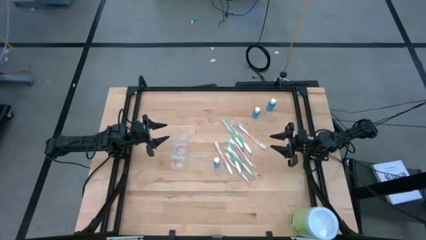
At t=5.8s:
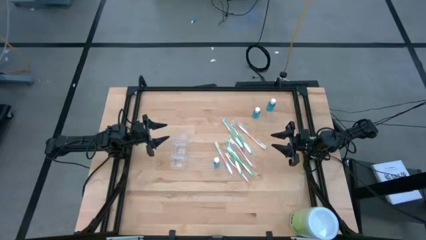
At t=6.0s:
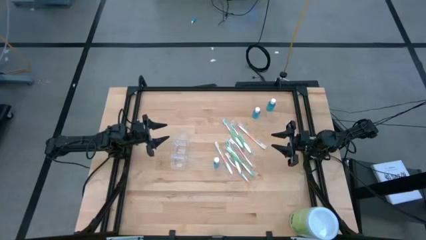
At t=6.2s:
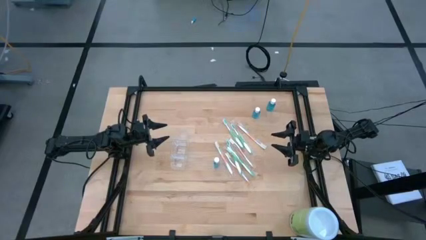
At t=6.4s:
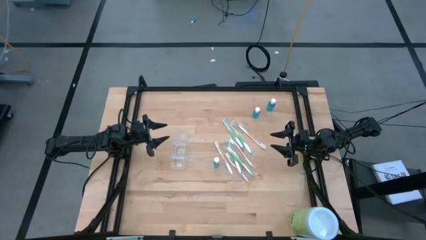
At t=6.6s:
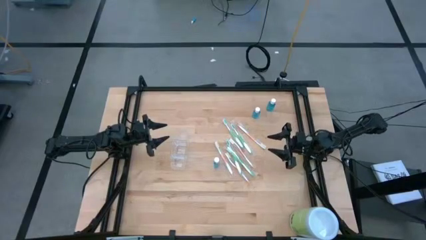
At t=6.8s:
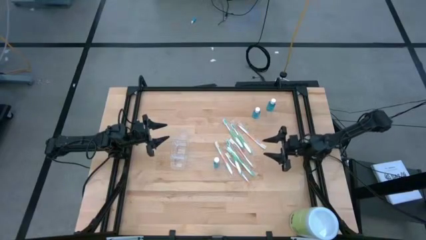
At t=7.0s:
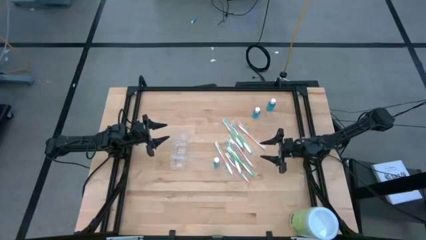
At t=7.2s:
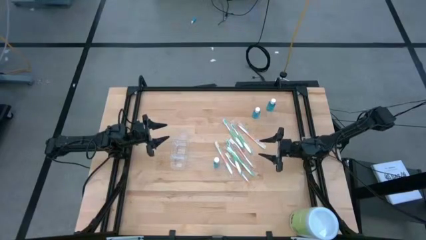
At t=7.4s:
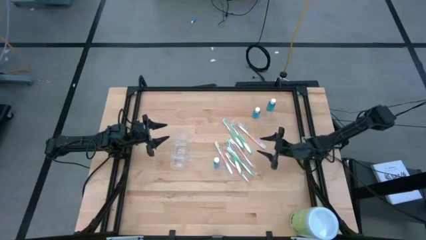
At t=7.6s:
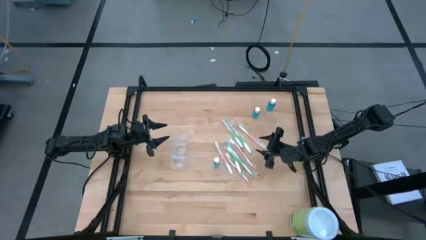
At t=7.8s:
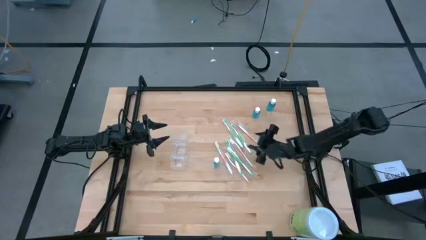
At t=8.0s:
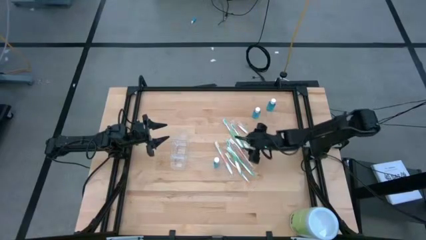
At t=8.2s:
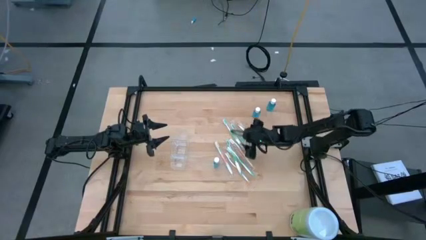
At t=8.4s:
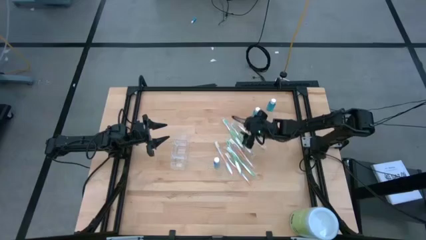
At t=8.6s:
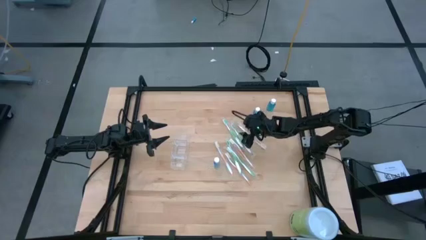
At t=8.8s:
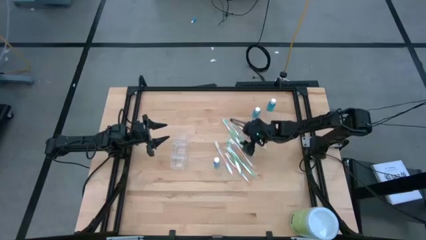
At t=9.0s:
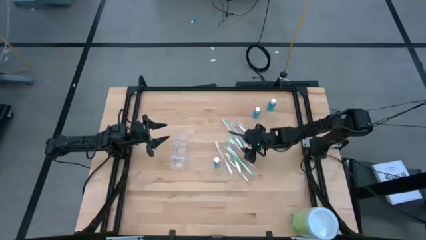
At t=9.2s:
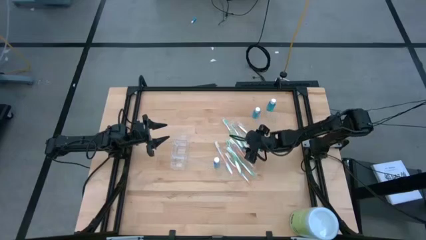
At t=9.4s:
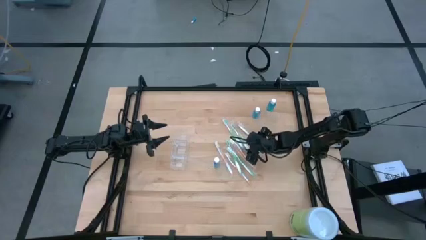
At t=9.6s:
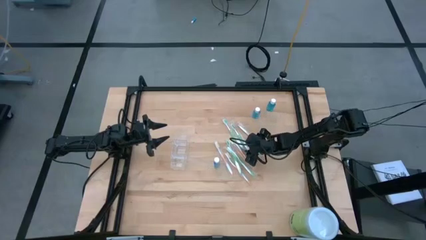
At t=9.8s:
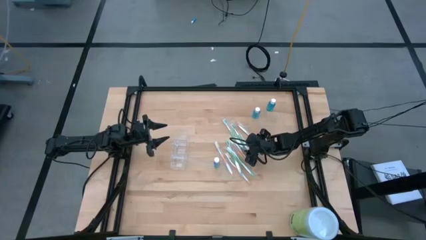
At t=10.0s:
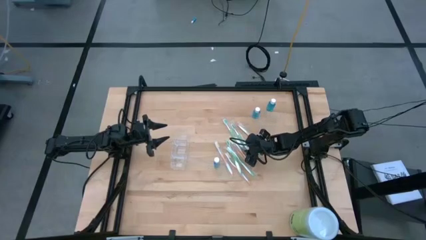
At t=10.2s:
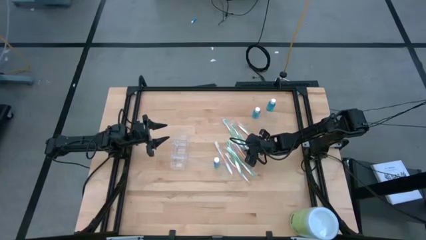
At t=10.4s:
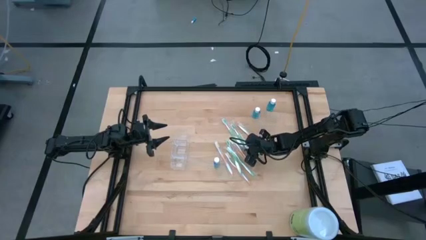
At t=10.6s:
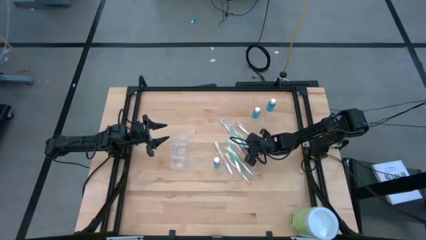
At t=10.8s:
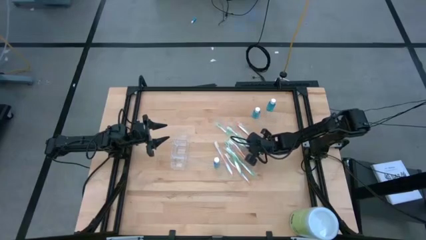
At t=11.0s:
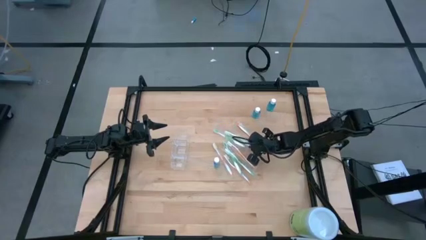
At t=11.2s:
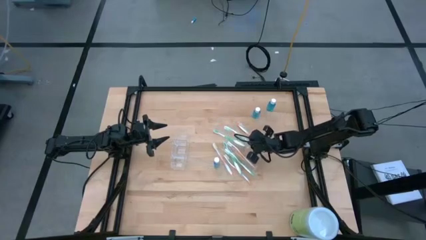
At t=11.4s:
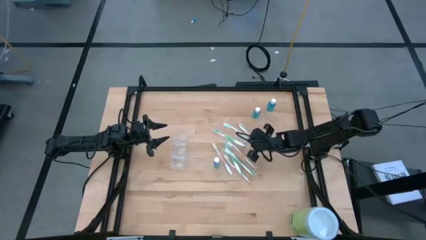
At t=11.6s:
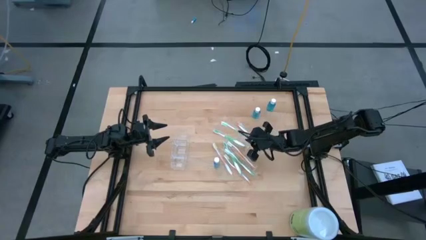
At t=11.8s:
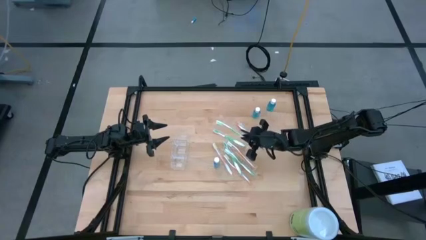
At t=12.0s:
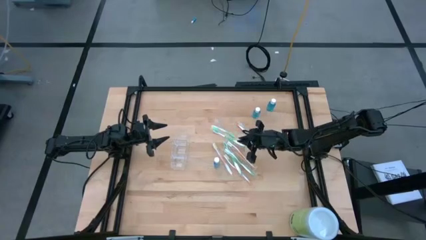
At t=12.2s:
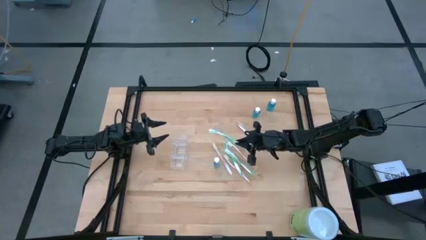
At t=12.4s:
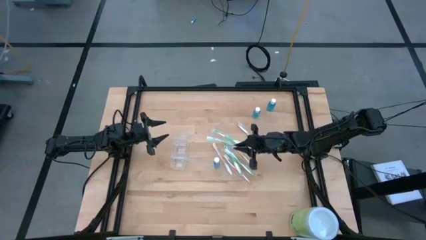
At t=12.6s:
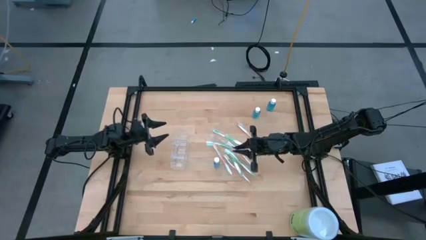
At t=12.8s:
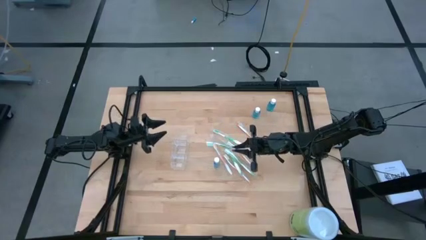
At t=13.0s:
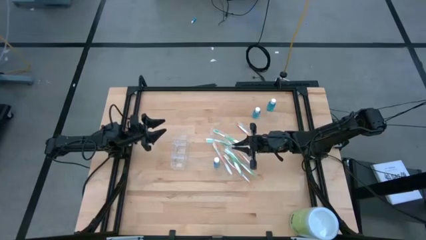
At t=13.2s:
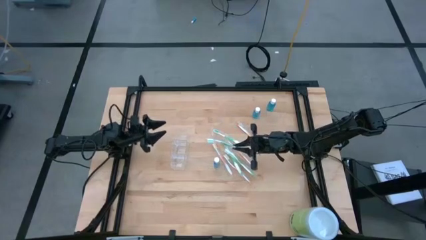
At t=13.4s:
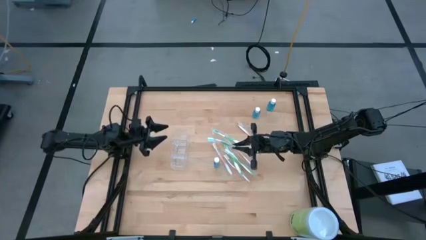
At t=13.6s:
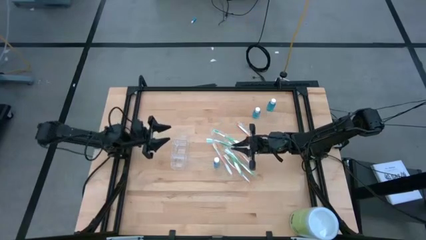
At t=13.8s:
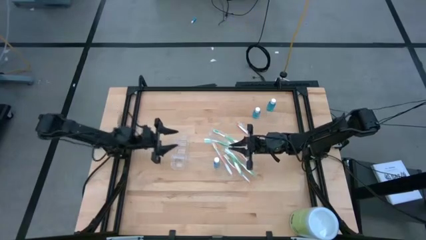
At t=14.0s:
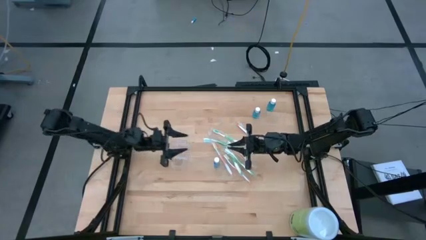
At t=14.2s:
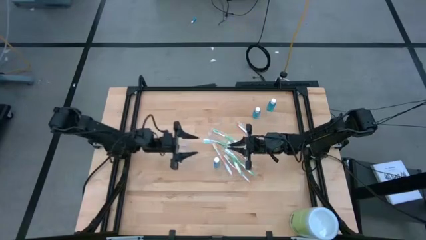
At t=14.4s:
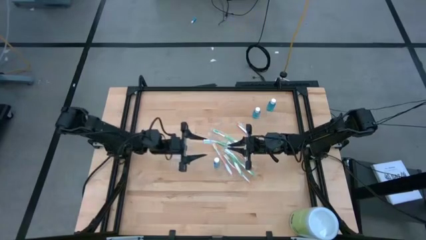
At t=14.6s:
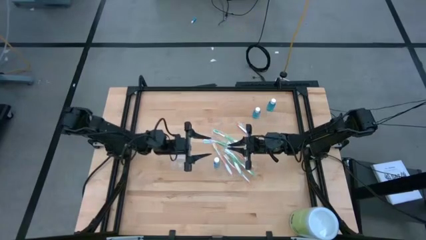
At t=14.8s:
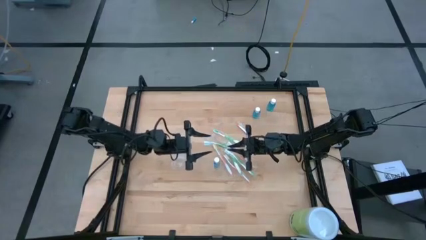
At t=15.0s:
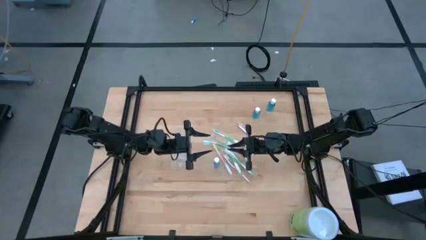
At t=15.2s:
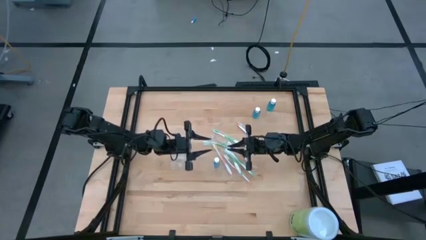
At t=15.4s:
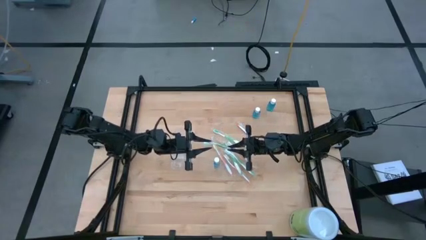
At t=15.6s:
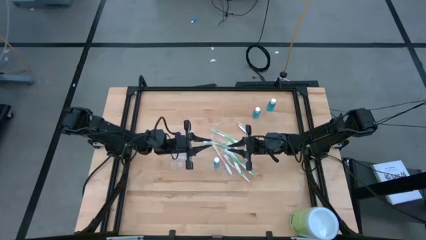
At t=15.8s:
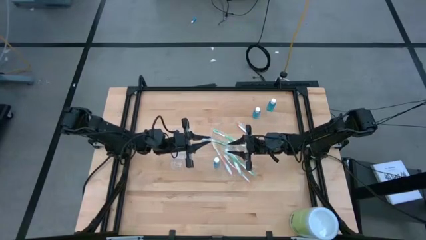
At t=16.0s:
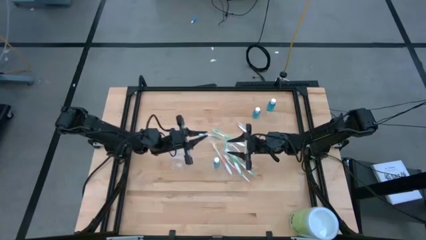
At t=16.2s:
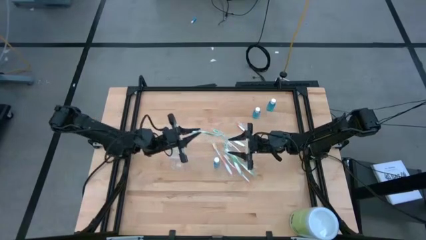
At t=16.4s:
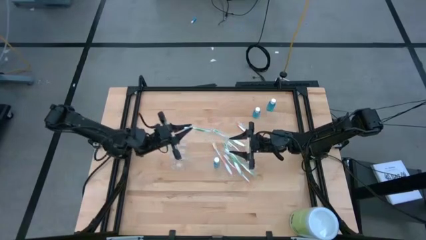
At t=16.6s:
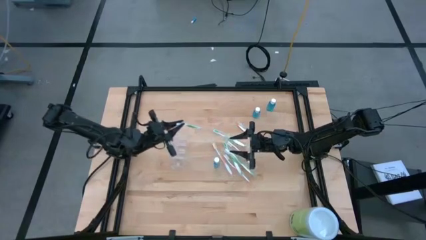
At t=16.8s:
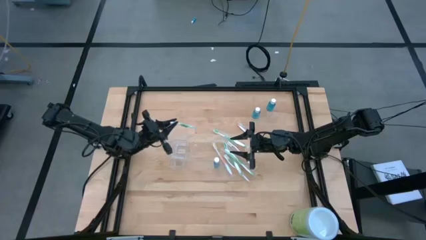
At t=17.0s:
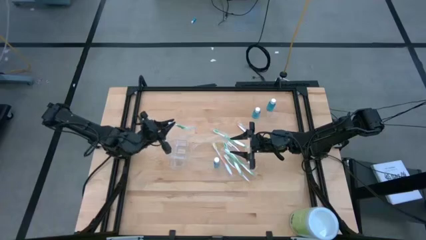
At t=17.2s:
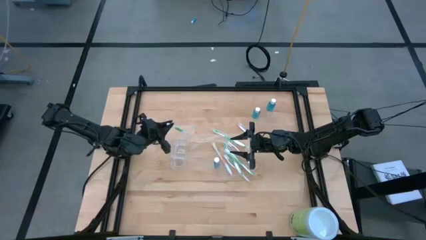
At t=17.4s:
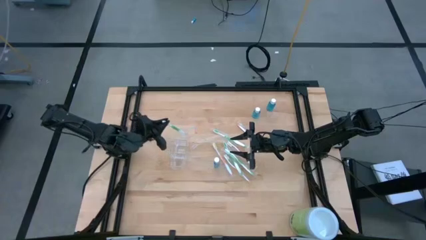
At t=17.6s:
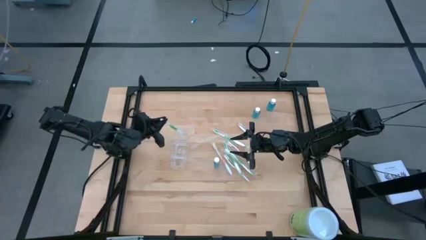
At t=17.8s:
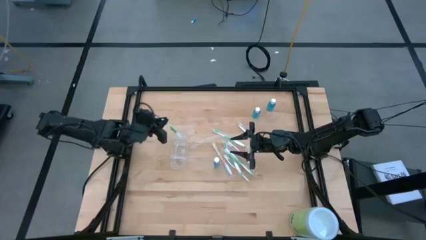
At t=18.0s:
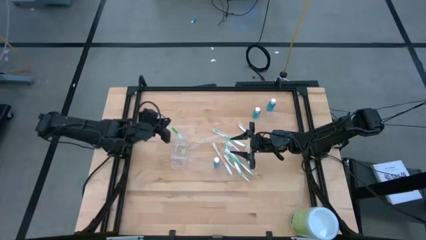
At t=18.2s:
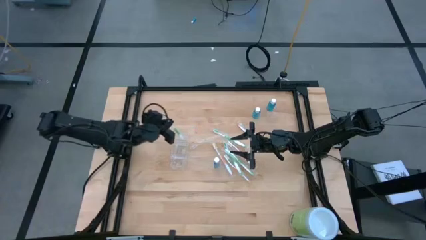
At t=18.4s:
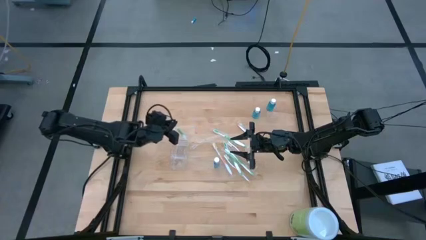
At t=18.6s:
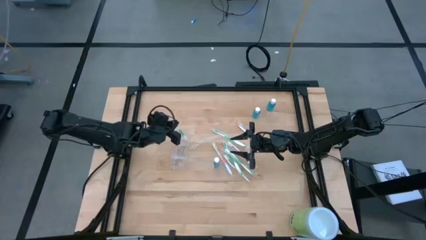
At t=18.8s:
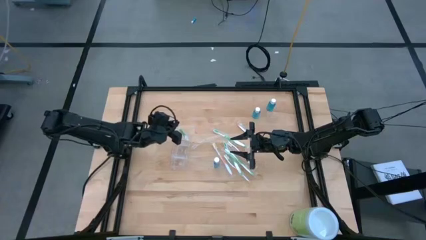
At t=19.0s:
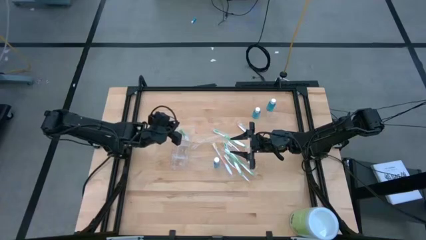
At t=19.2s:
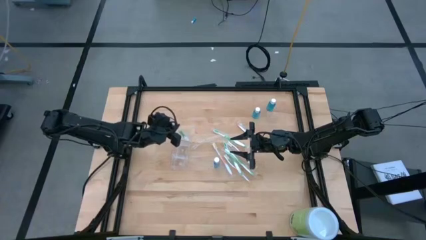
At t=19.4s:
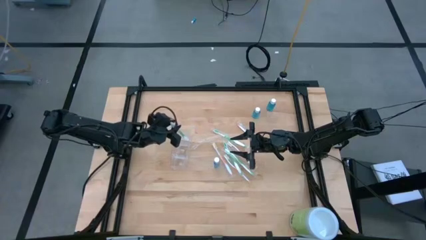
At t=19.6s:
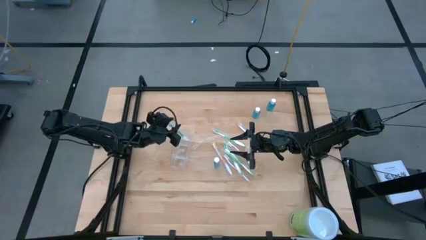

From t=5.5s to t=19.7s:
Task: Pick & Place toothbrushing station
Put the green toothbrush into the top section of the transparent organizer
